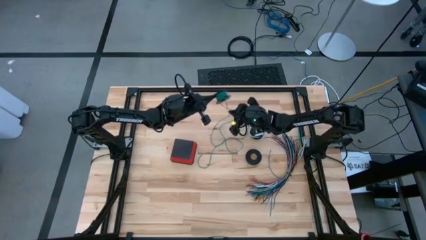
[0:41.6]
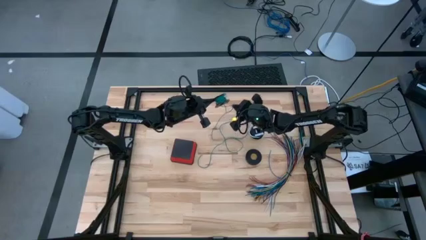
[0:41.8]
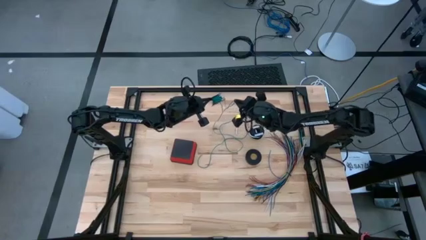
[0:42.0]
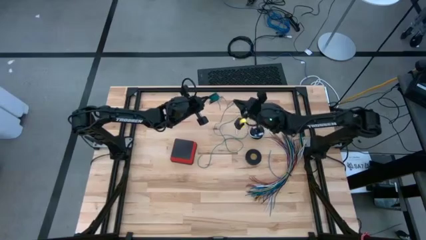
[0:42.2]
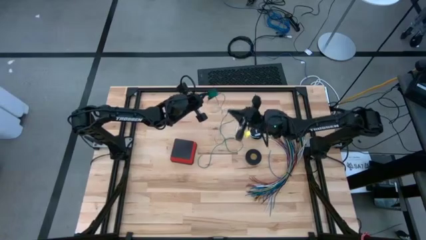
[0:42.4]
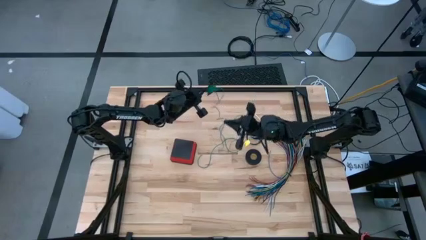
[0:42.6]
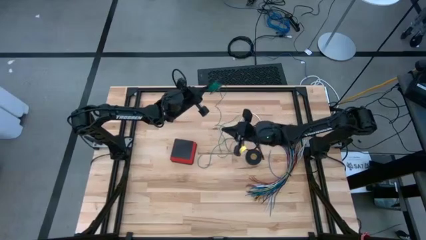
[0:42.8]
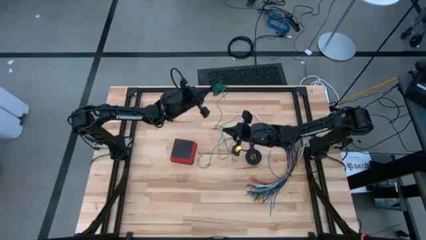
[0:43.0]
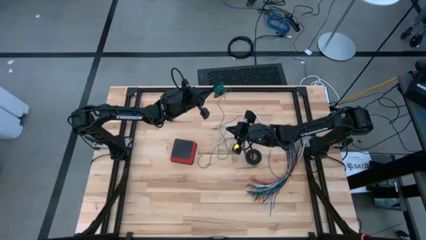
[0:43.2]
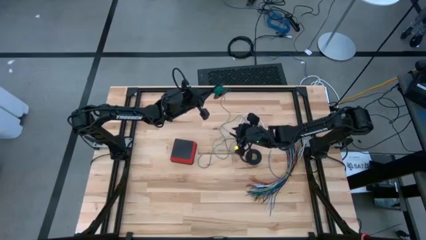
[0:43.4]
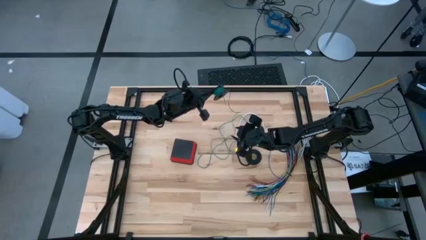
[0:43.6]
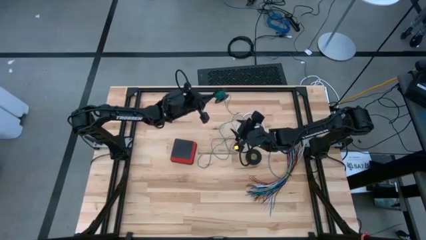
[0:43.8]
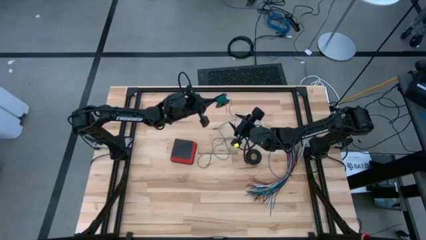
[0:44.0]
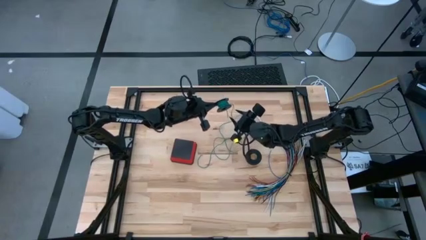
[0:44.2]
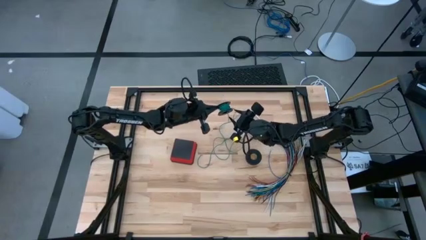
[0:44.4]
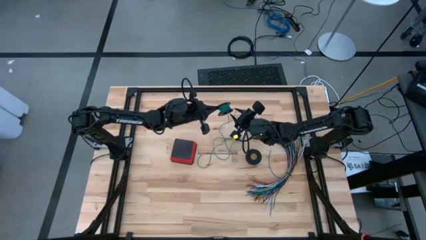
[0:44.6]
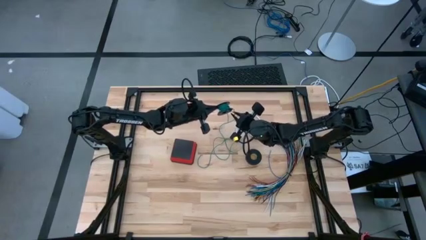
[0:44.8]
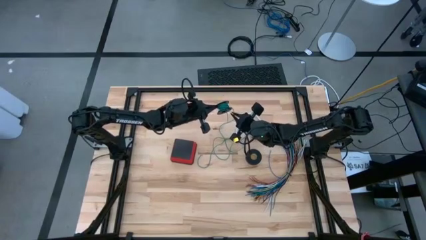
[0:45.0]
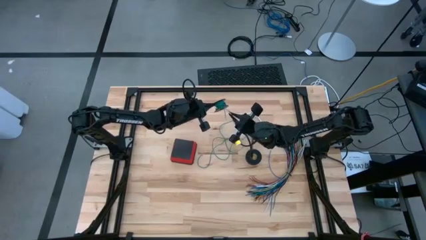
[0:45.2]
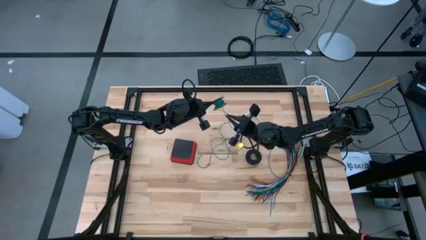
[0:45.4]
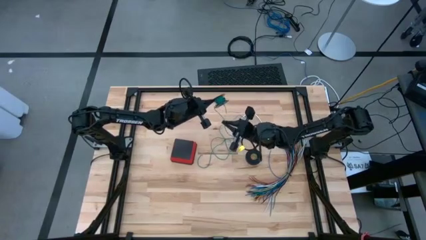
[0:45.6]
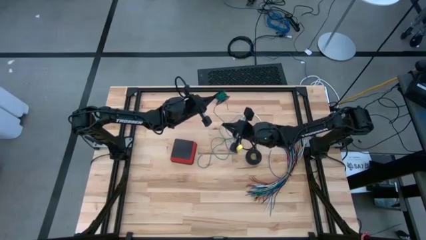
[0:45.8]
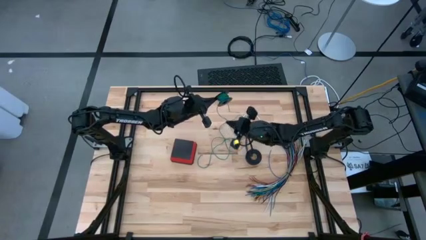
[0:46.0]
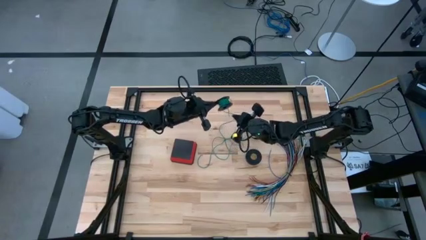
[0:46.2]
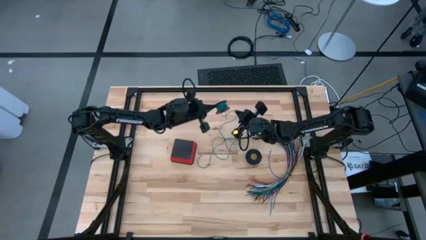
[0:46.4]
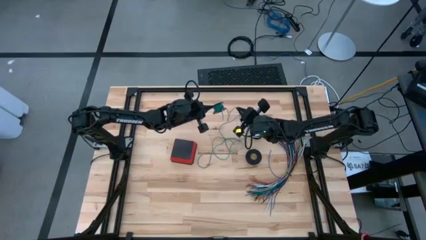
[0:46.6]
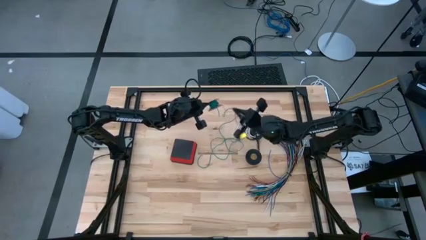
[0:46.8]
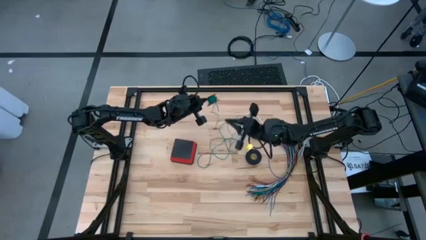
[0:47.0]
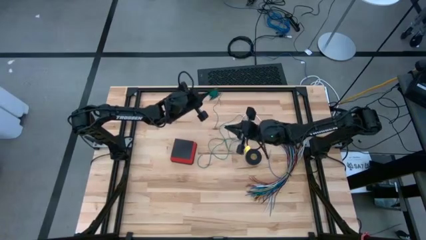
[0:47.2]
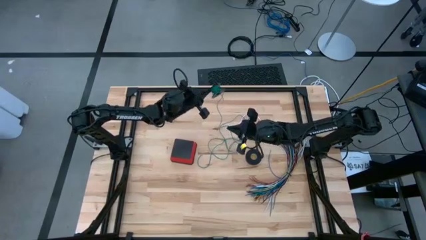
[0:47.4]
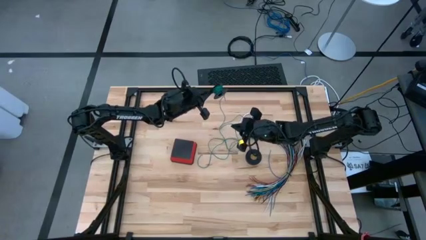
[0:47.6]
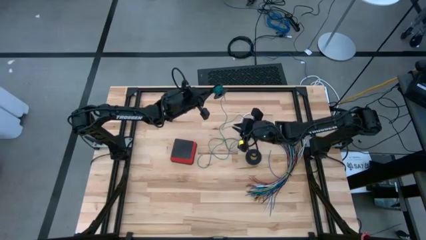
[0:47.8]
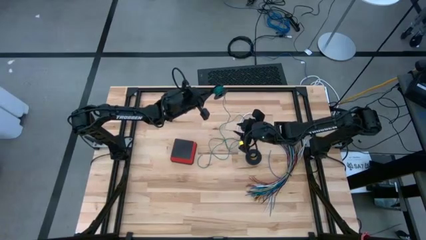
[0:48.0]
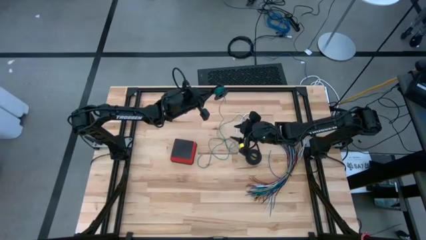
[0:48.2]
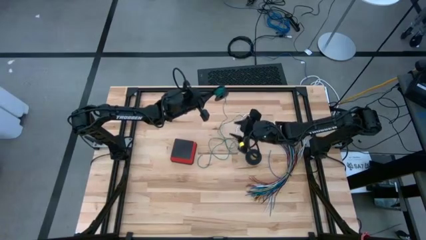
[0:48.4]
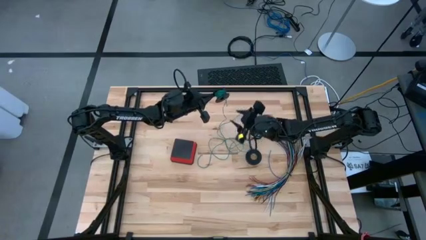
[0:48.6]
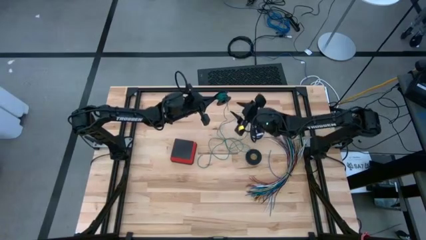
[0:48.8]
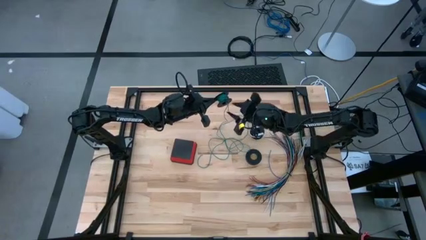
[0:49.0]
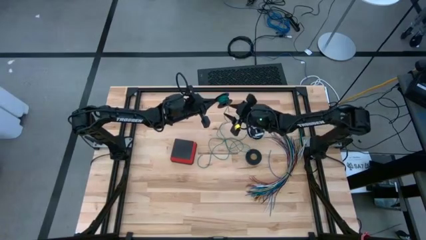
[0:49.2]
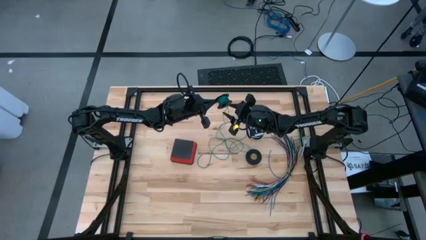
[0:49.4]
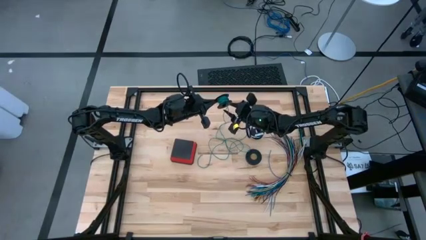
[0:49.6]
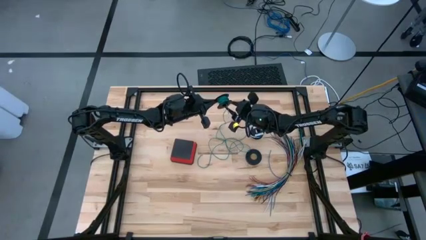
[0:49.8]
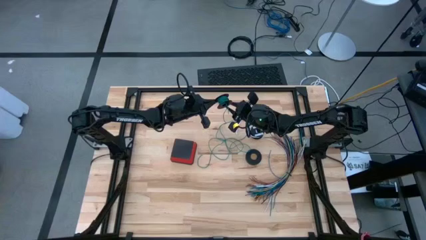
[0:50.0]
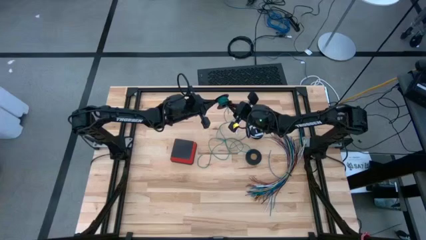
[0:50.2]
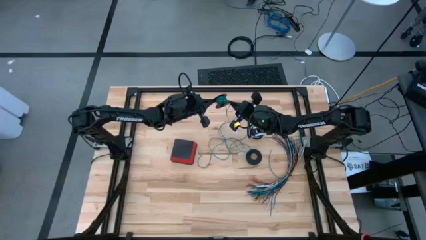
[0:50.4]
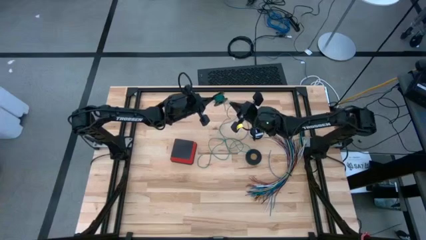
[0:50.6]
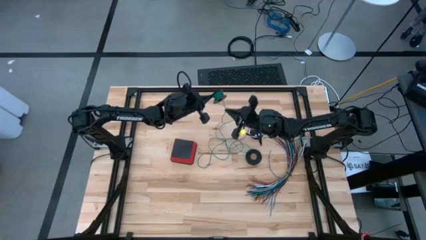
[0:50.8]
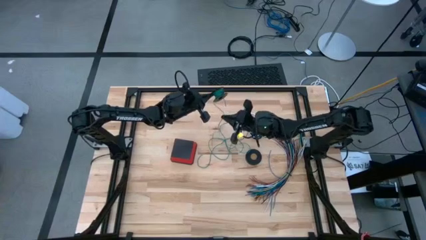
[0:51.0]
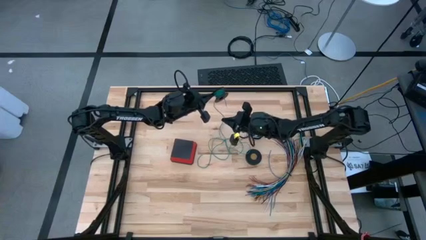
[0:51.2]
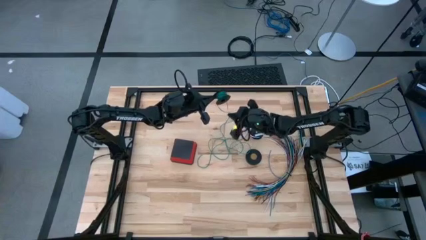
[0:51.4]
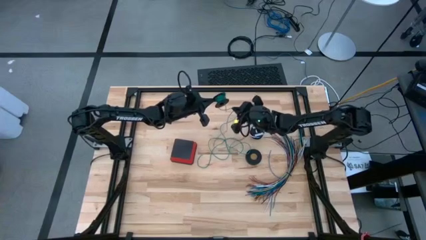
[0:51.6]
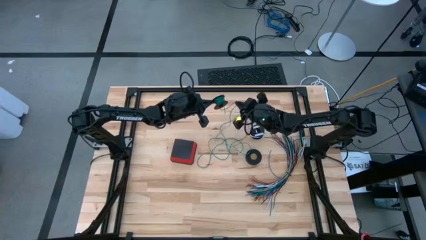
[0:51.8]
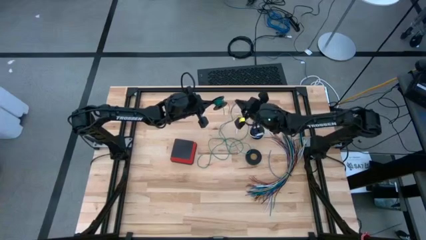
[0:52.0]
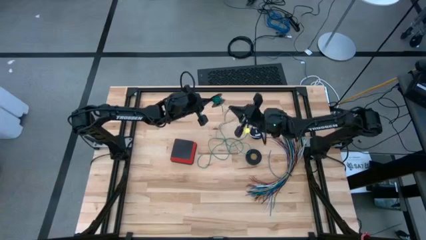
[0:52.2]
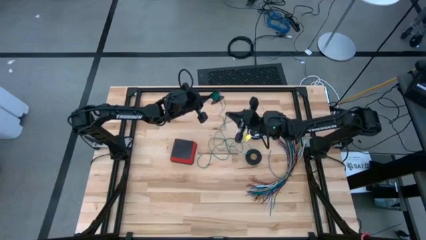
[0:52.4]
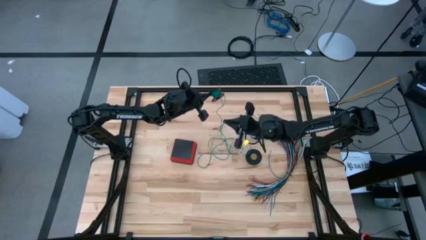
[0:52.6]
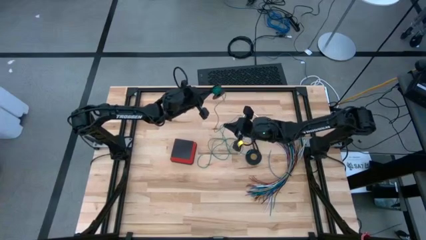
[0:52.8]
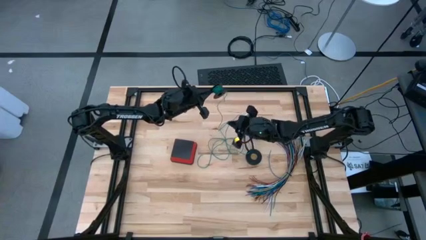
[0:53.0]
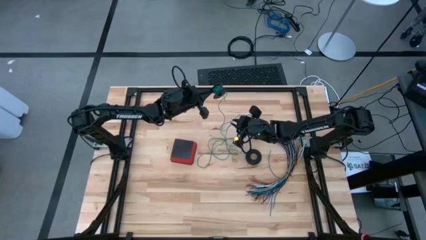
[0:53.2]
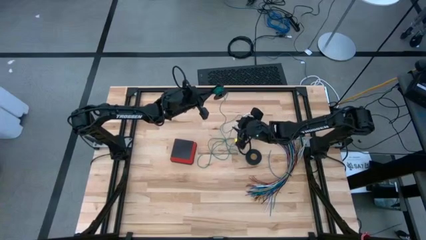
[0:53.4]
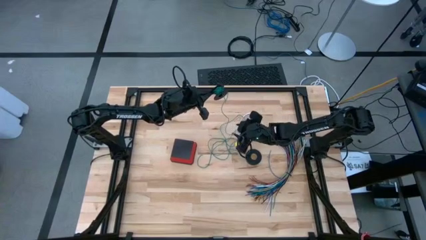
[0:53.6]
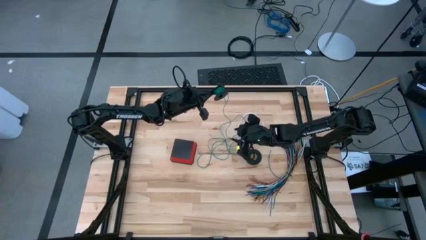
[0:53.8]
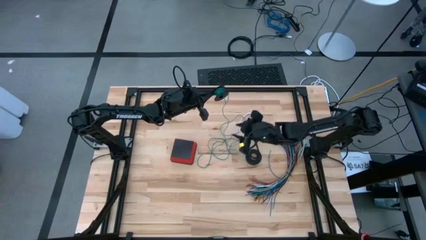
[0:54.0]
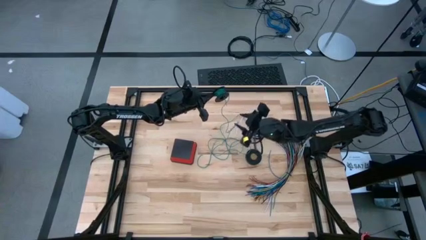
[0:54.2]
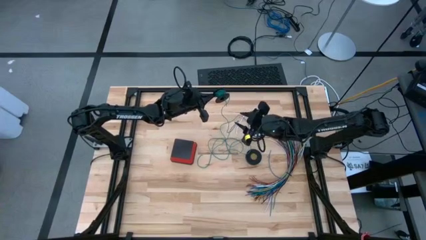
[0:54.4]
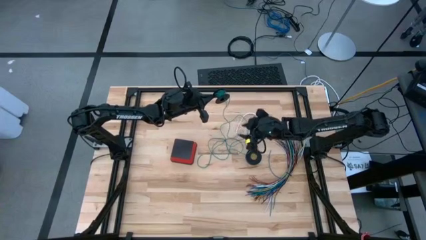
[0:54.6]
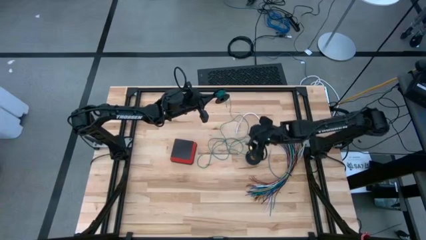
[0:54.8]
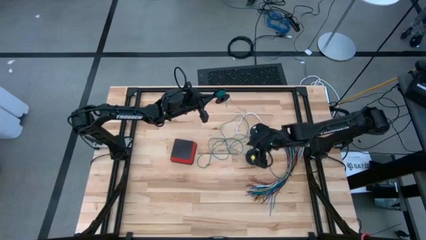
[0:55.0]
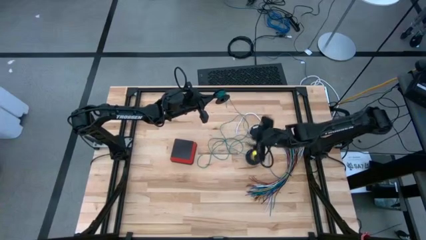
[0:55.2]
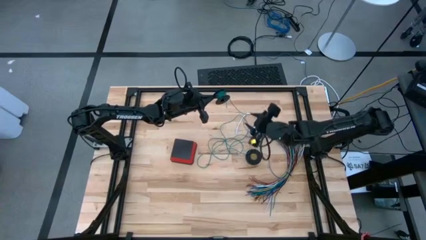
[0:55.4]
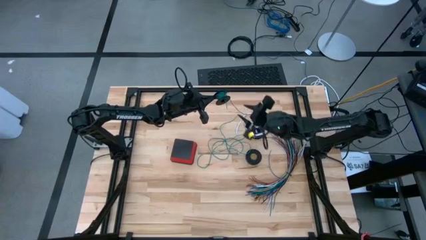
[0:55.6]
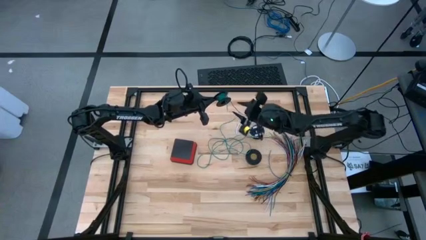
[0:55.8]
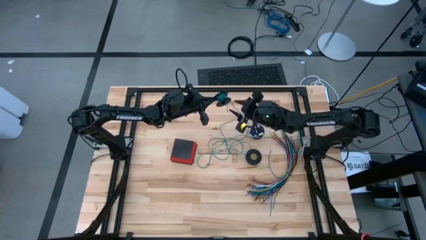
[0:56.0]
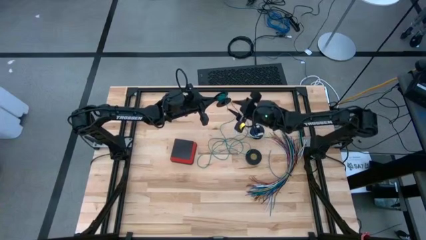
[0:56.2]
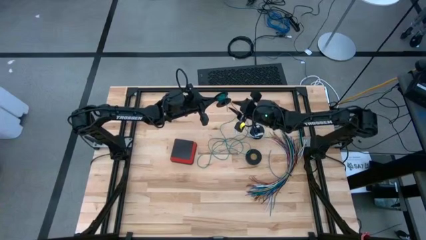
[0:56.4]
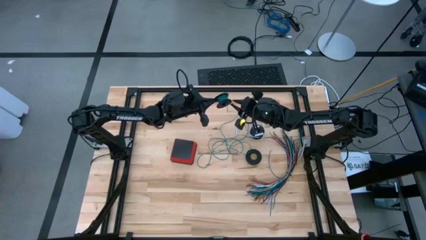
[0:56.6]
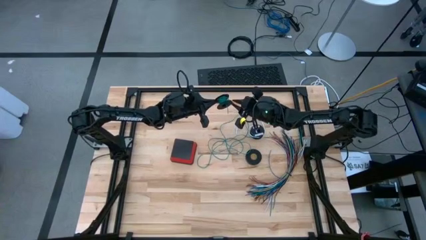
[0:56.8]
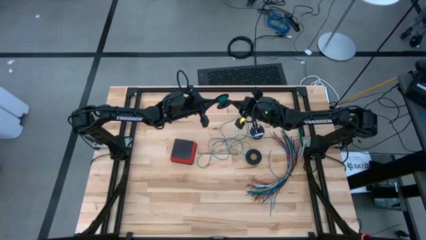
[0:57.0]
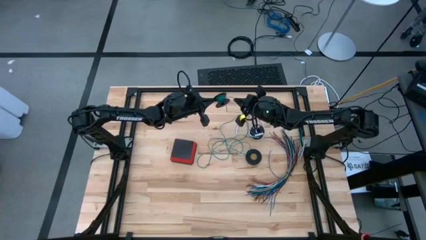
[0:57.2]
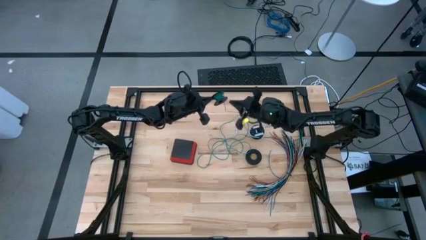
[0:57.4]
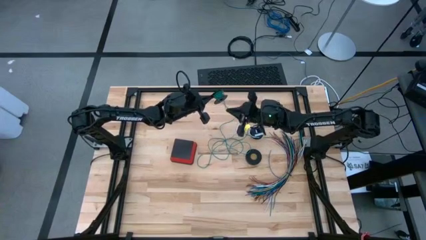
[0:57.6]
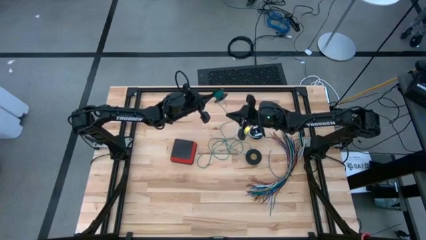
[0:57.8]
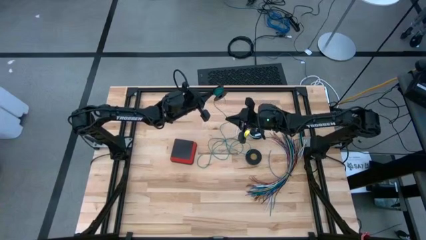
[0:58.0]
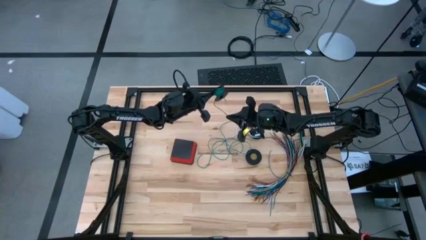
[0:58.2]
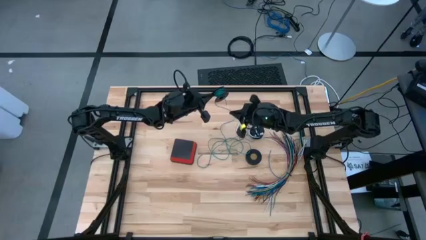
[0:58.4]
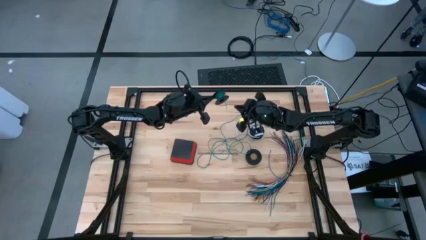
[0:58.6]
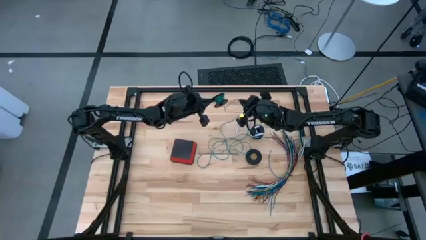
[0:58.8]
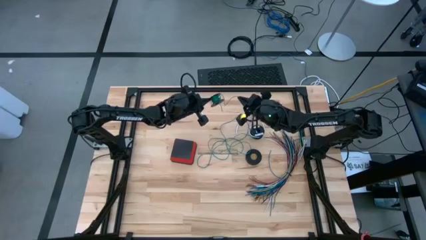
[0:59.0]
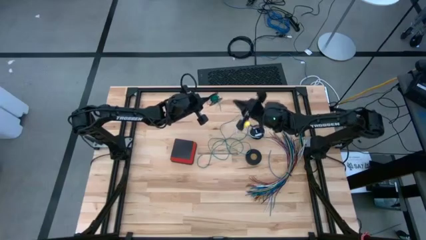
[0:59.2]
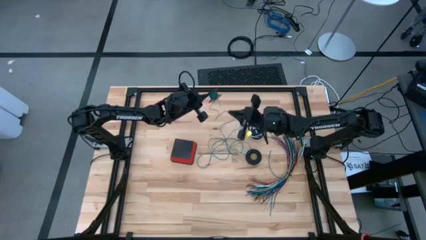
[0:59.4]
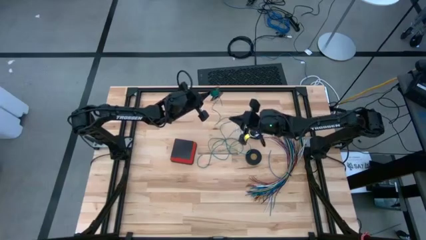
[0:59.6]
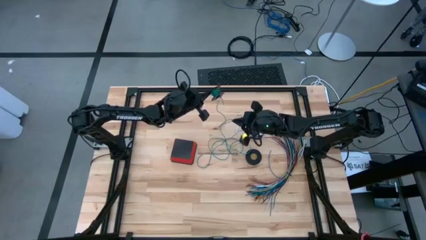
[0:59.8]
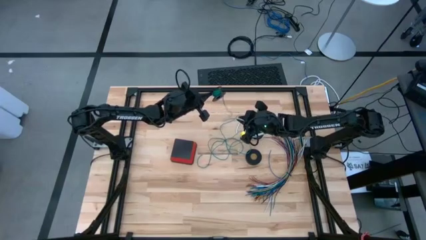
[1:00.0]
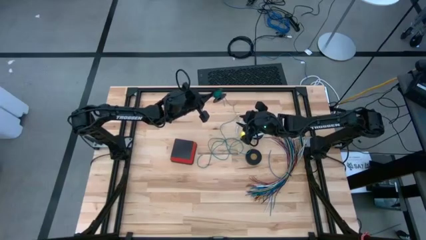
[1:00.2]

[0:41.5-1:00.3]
Task: Coiling cords
Uncoil the green wire cable from the spool
